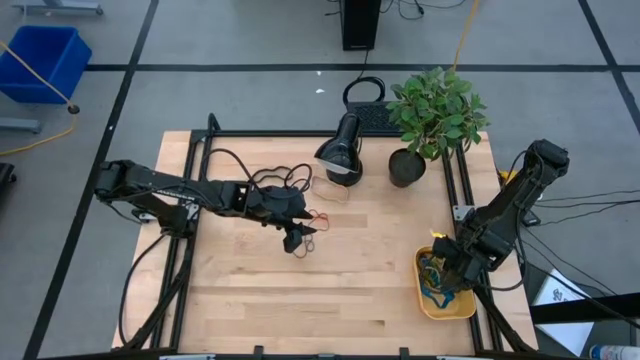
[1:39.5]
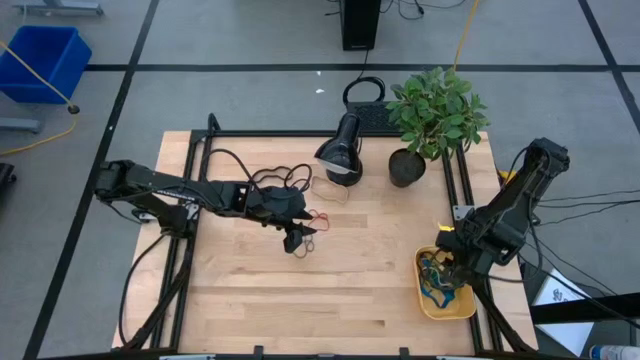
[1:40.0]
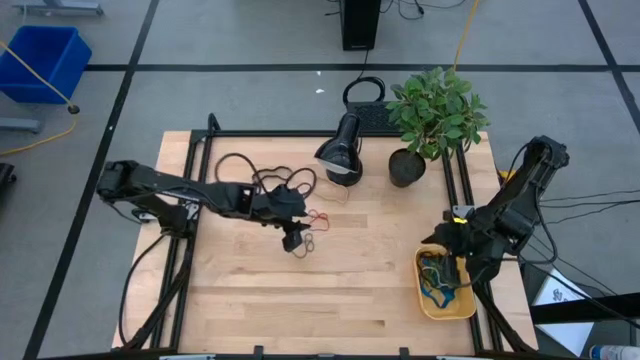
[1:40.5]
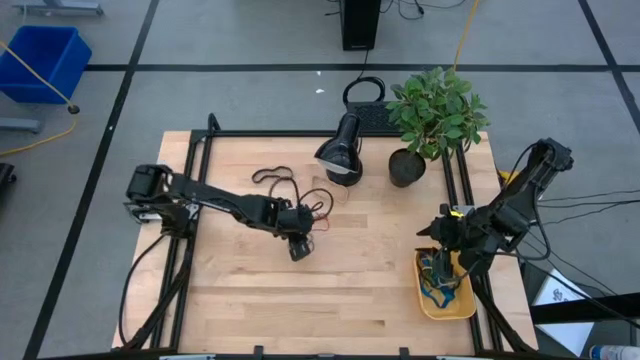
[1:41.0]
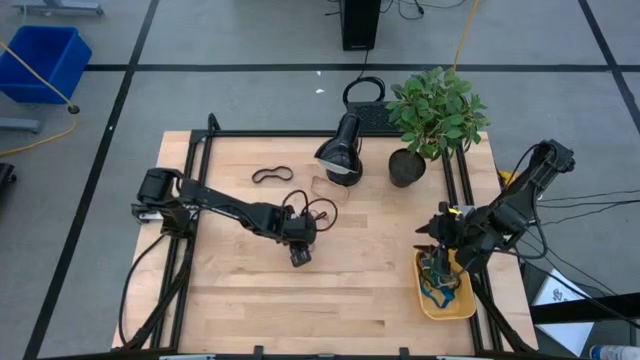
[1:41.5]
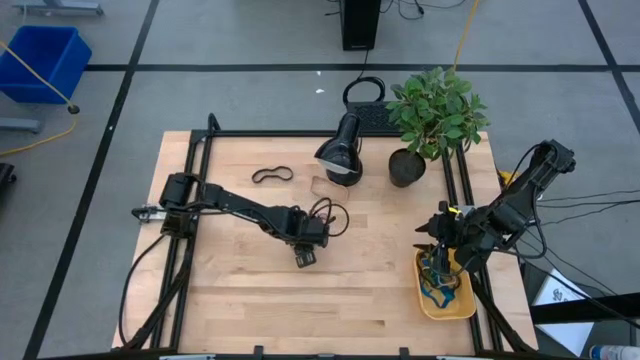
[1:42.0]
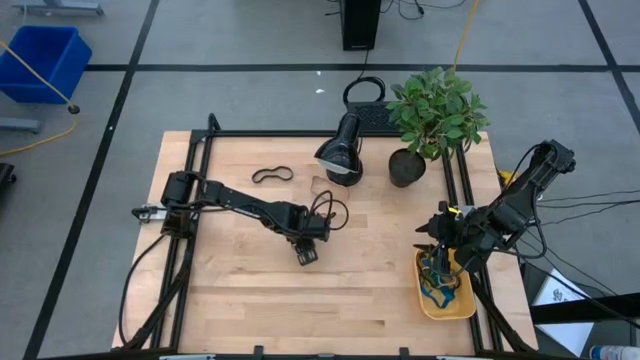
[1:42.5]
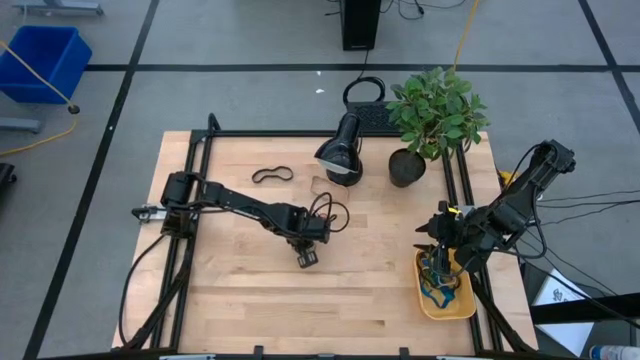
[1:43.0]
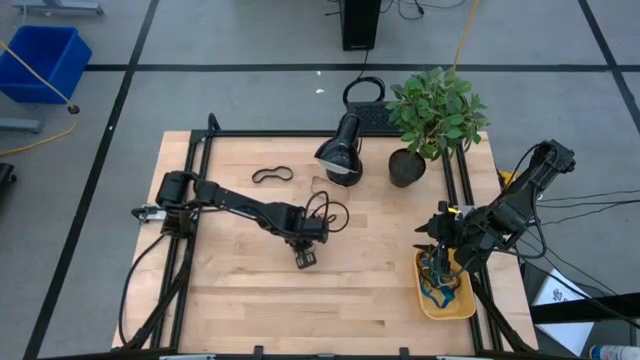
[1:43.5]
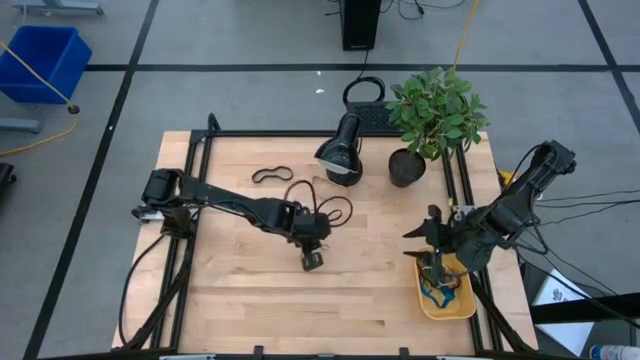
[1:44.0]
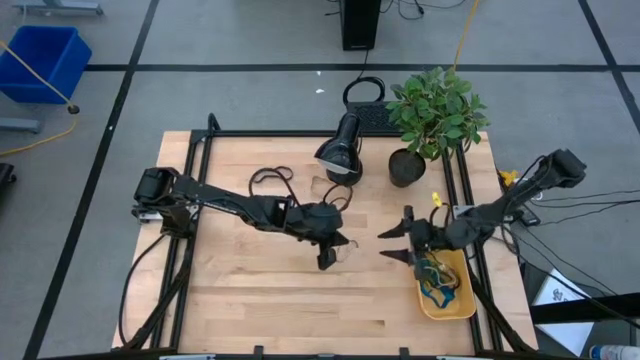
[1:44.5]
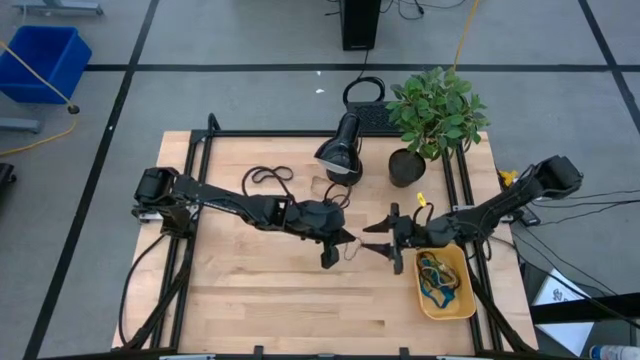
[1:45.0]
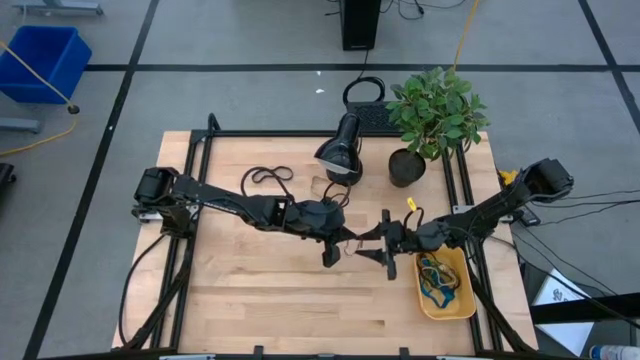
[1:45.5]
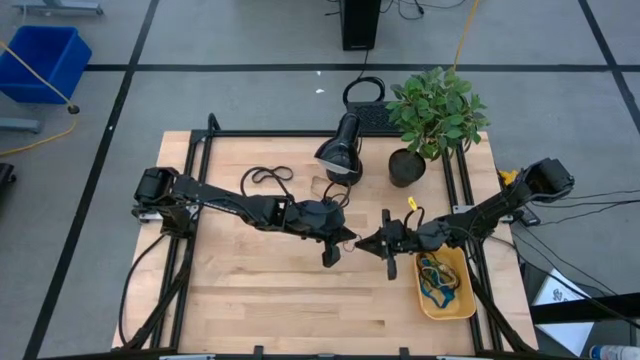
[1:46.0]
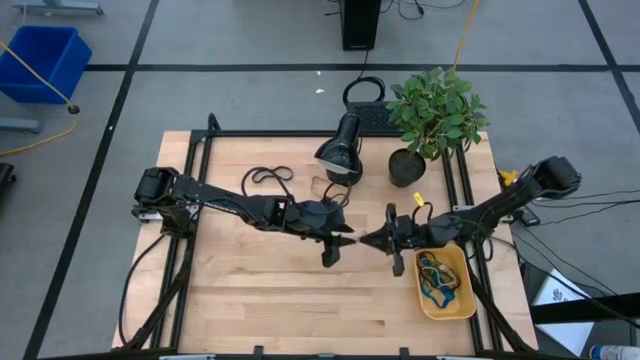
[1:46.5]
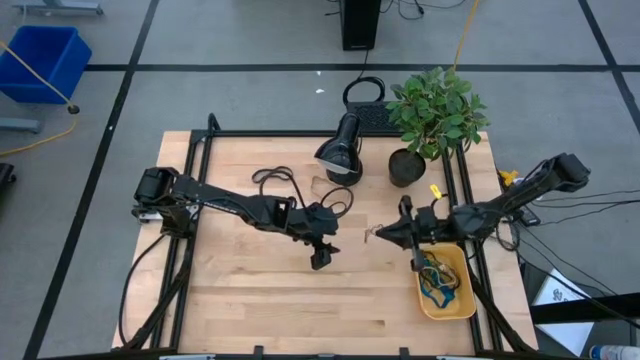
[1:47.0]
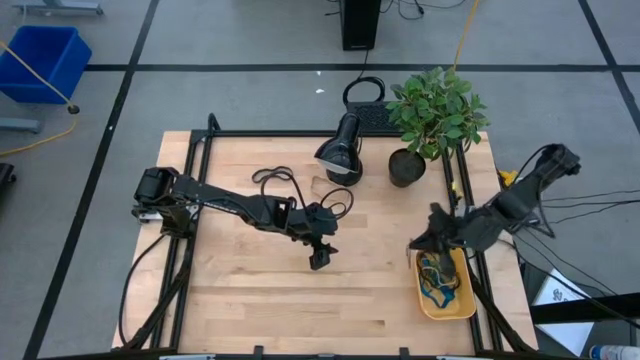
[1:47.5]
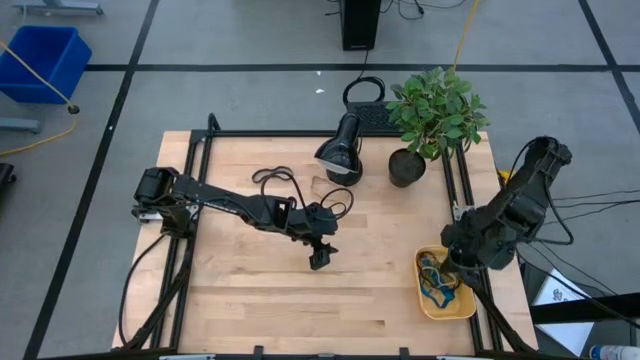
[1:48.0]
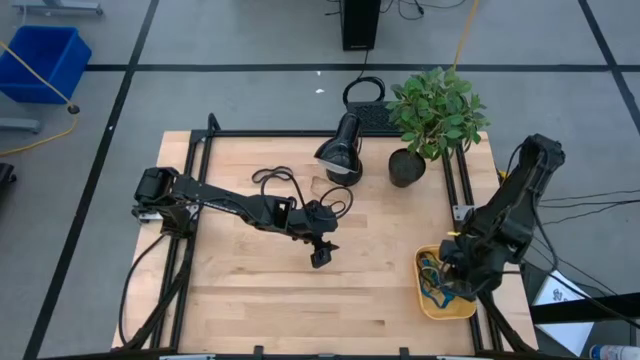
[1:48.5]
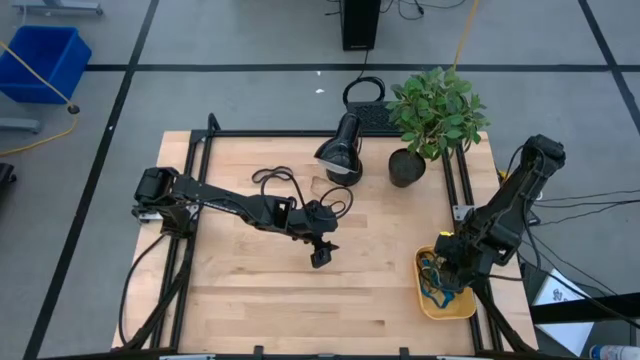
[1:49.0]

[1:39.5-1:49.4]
Task: Pick and place rubber bands into bin
Put the violet rubber band into the yellow bin

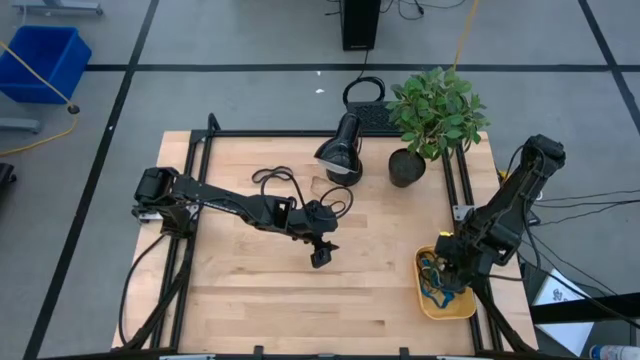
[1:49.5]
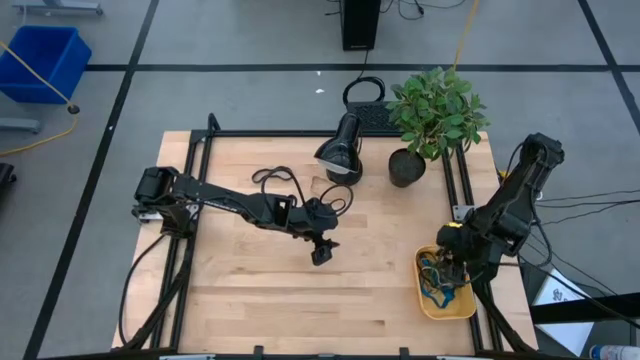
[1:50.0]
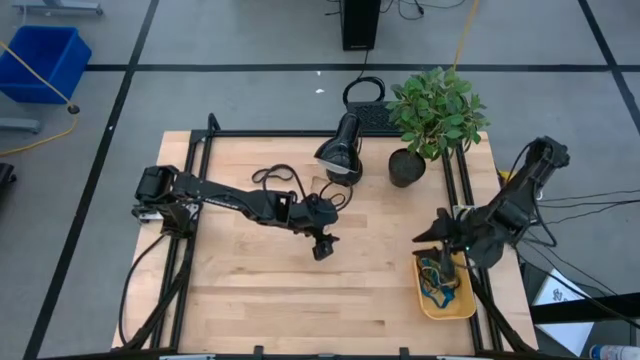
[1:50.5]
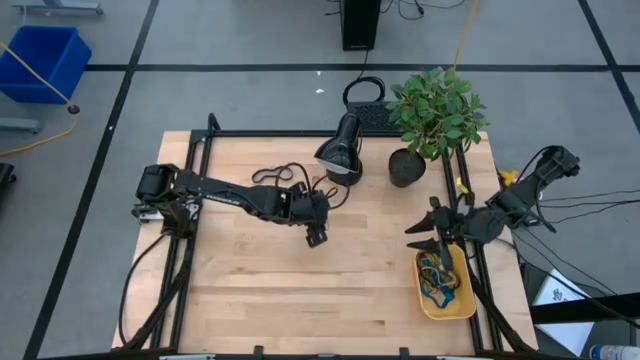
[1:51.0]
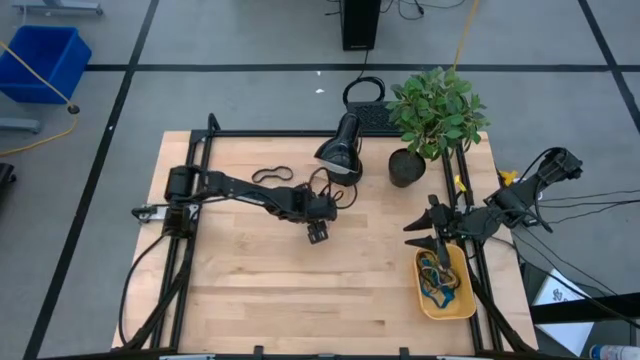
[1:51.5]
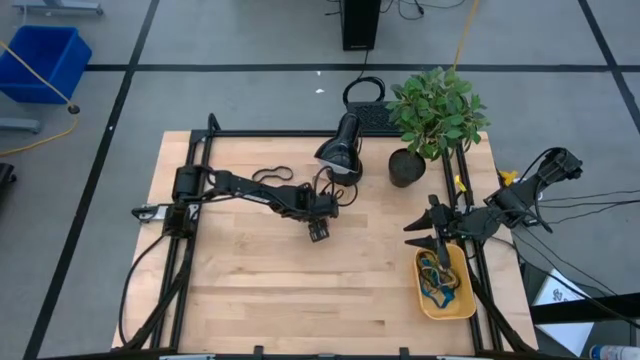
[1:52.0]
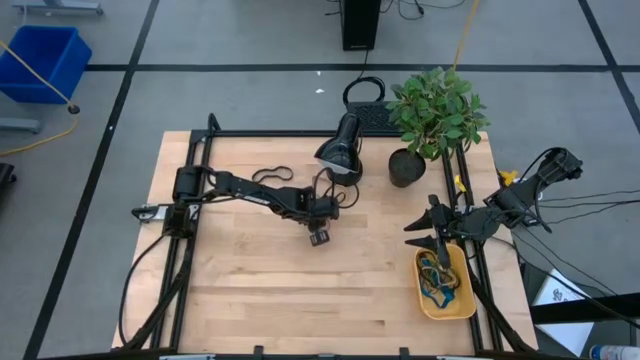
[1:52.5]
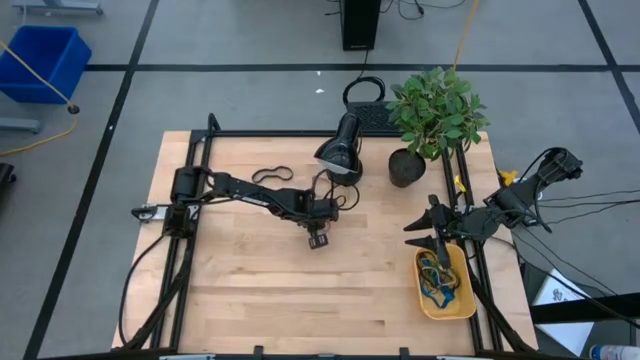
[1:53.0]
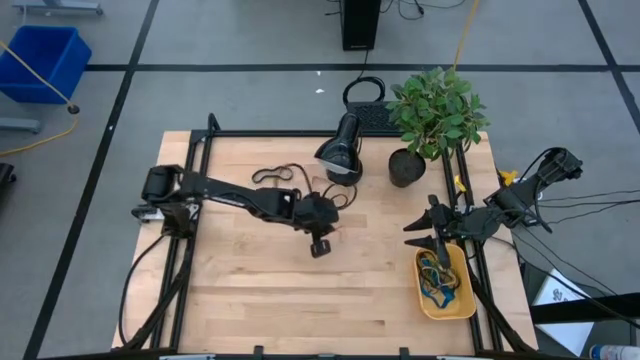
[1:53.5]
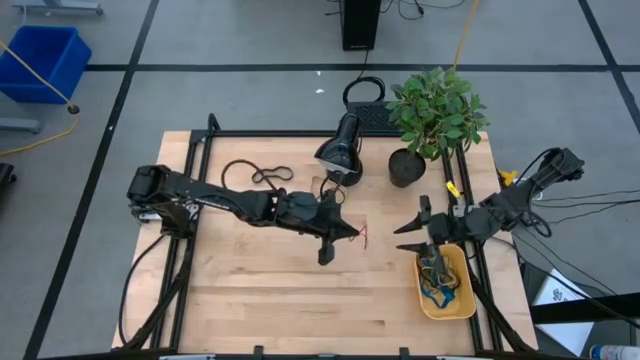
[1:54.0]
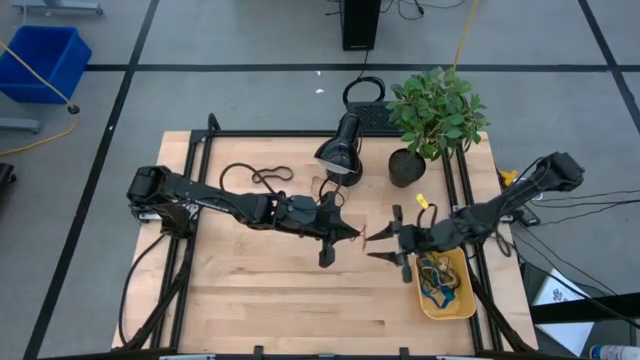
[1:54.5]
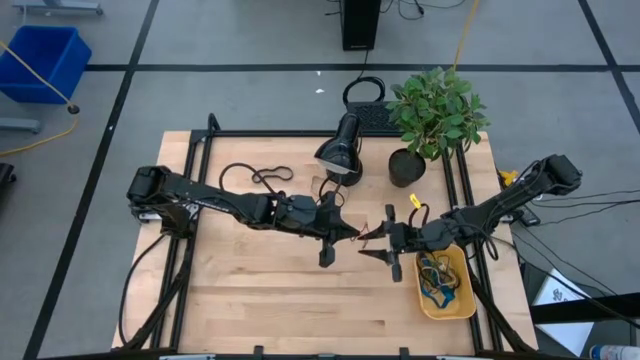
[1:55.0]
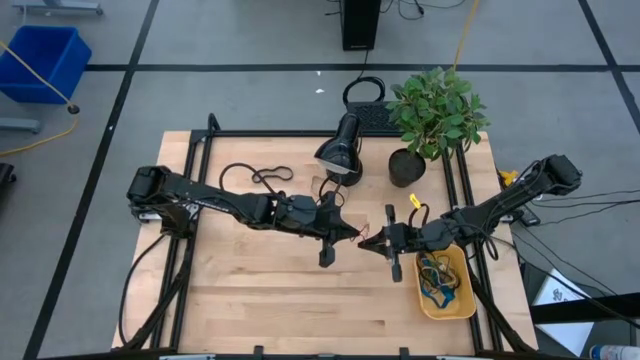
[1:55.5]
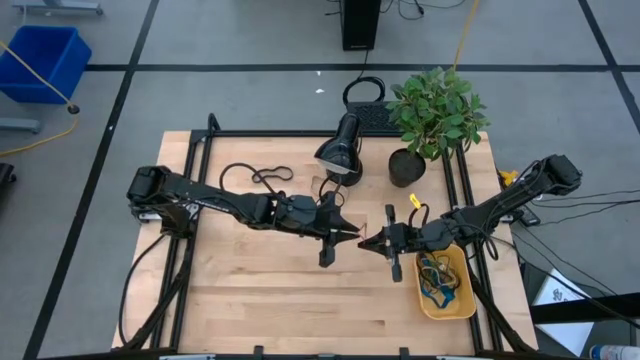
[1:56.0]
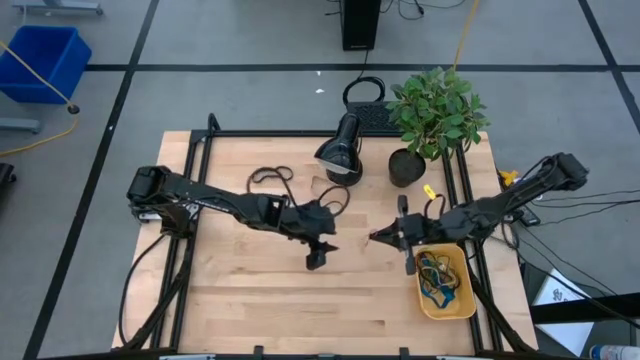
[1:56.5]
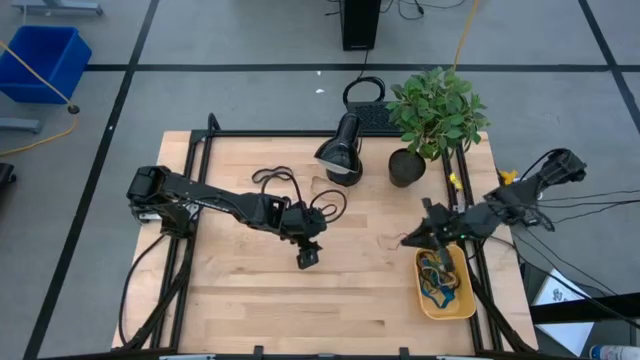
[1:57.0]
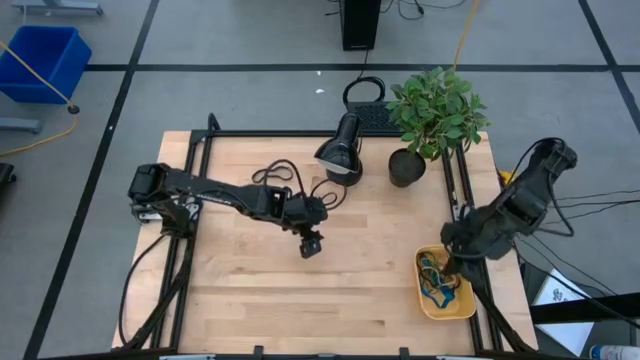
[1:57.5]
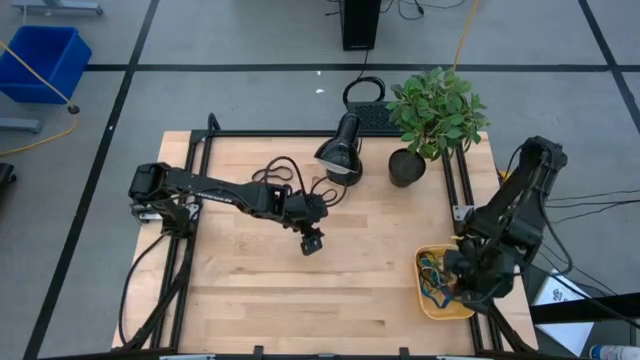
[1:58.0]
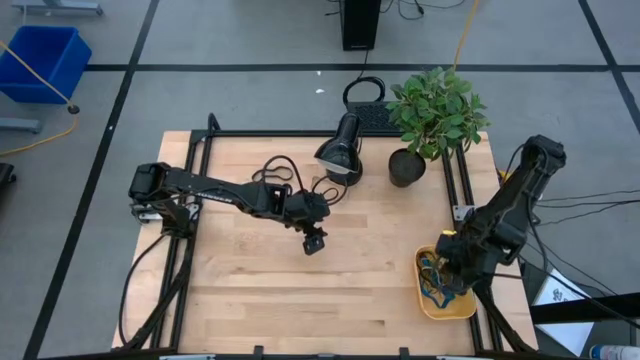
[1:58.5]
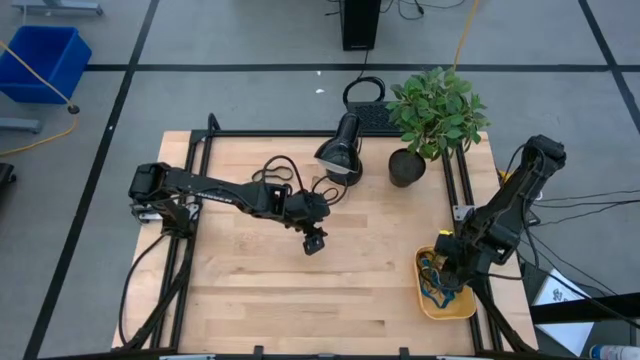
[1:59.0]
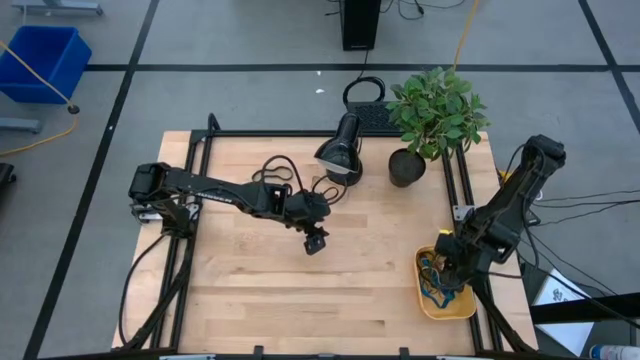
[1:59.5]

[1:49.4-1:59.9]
Put the red rubber band into the yellow bin

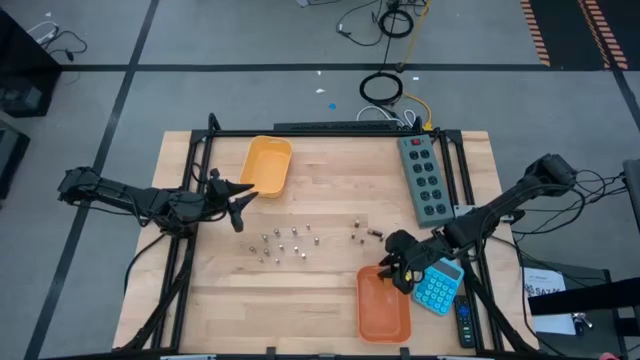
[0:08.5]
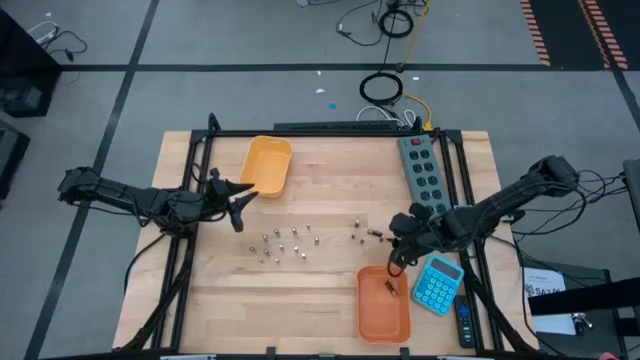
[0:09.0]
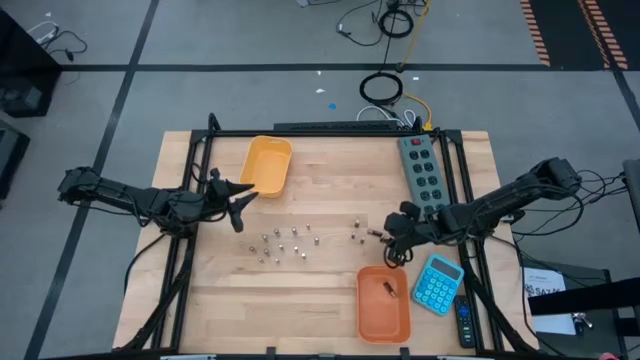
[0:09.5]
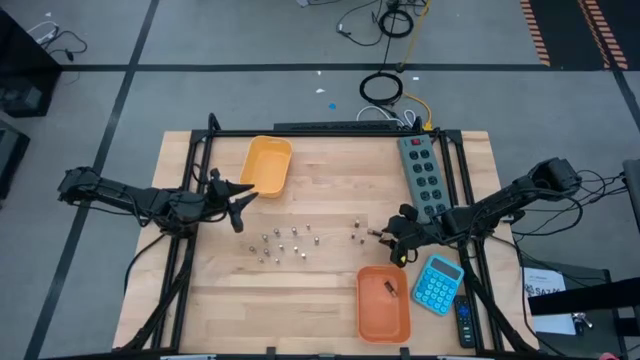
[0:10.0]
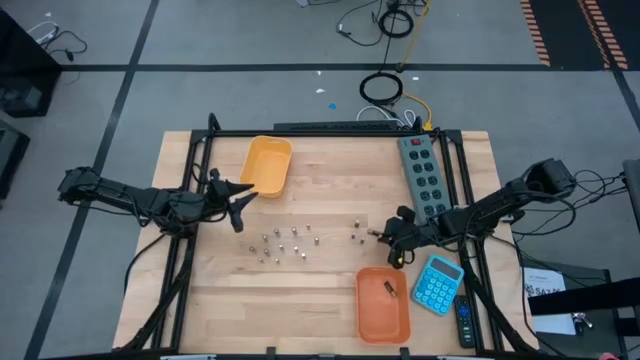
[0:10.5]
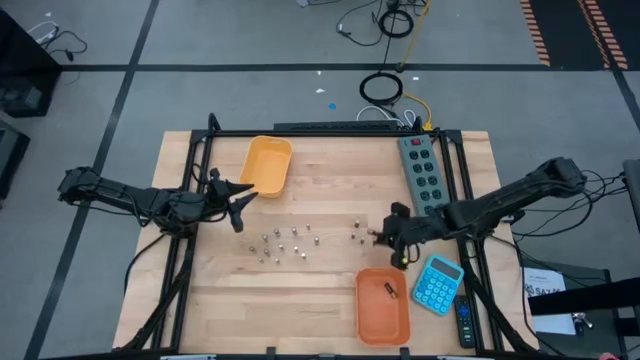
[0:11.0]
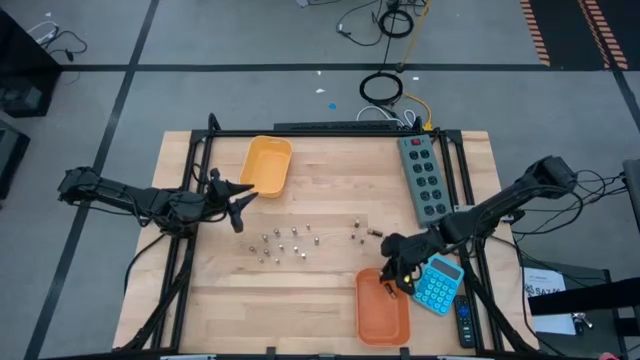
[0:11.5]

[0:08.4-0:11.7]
Task: Sort batteries
Put the black battery into the orange bin
